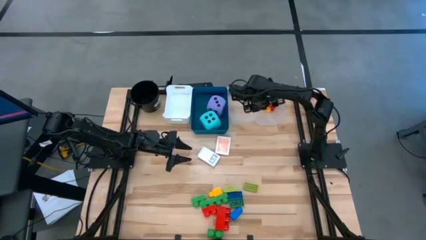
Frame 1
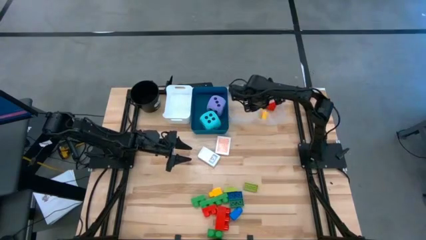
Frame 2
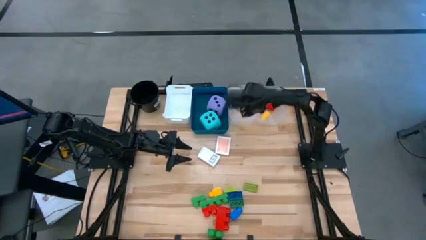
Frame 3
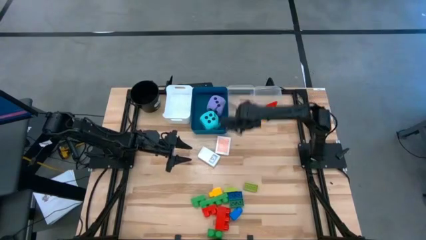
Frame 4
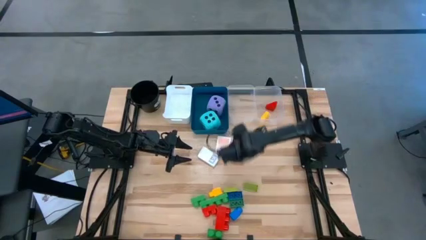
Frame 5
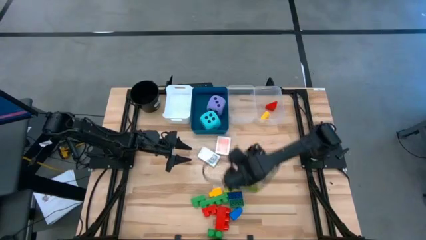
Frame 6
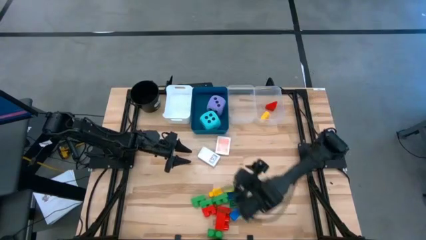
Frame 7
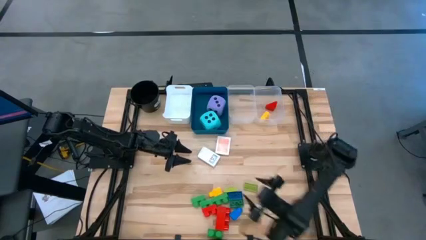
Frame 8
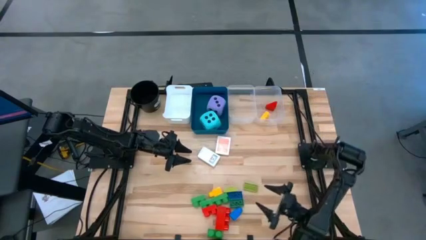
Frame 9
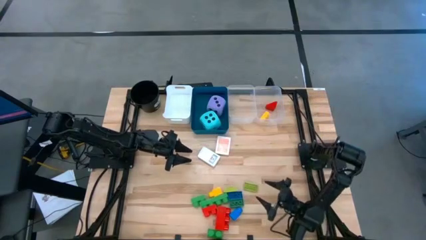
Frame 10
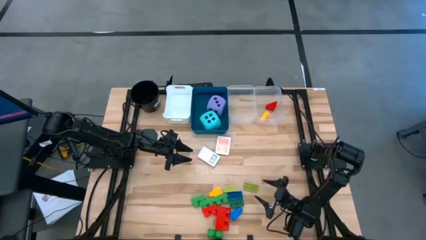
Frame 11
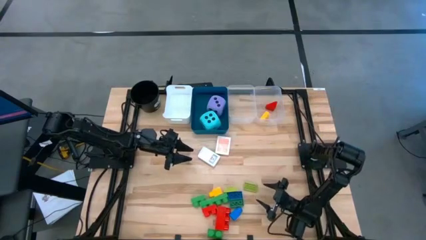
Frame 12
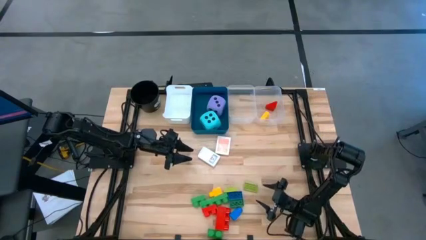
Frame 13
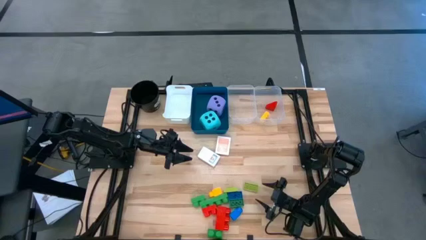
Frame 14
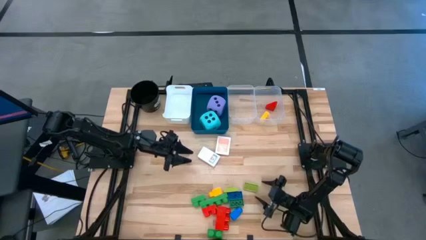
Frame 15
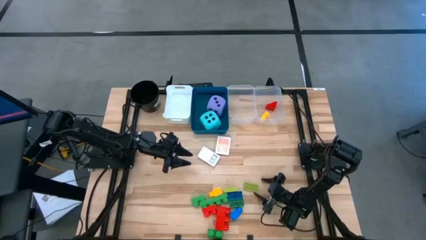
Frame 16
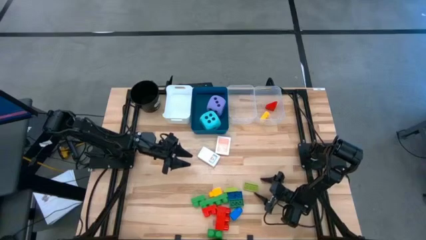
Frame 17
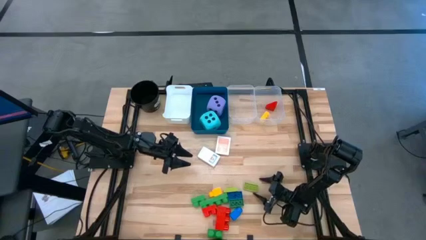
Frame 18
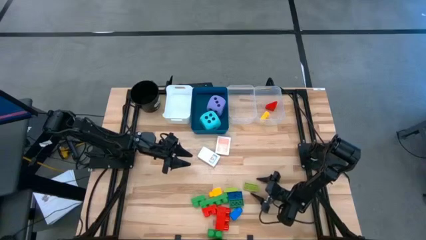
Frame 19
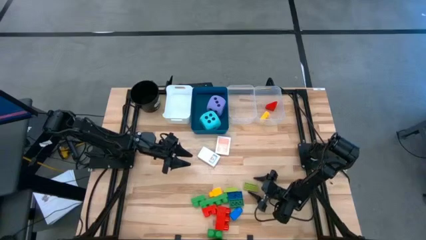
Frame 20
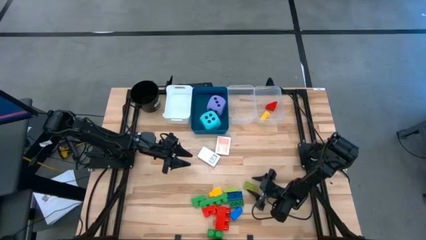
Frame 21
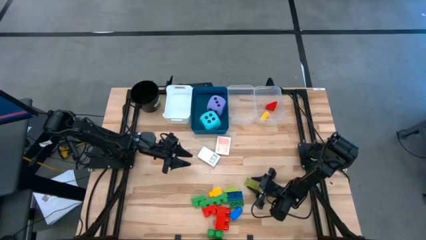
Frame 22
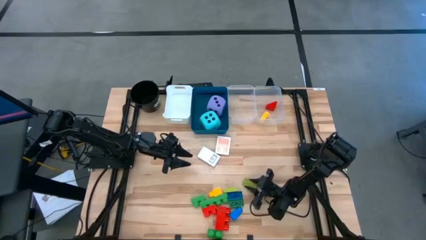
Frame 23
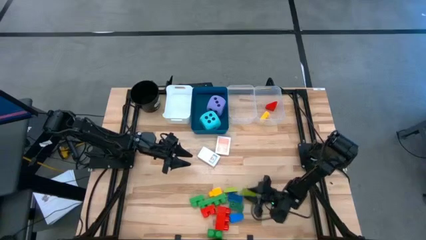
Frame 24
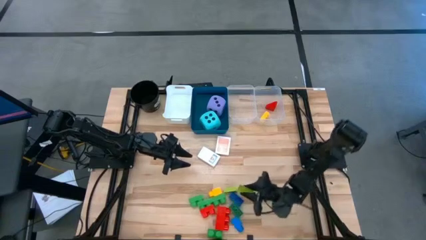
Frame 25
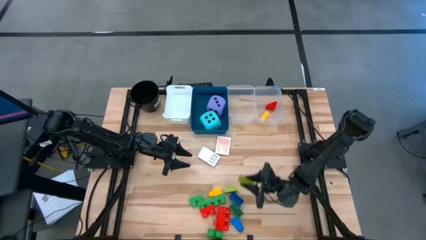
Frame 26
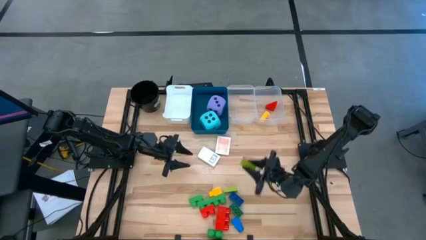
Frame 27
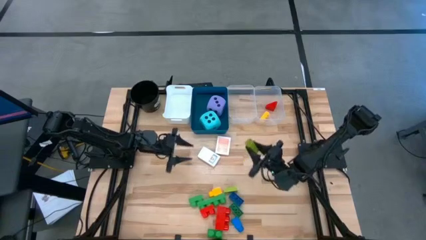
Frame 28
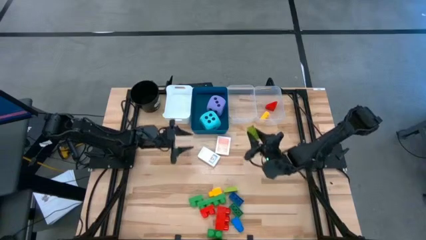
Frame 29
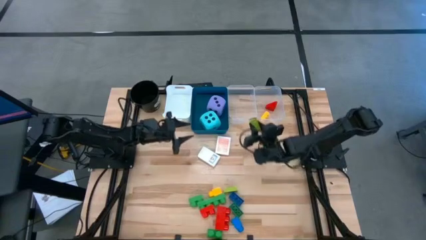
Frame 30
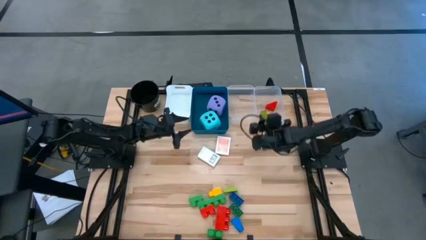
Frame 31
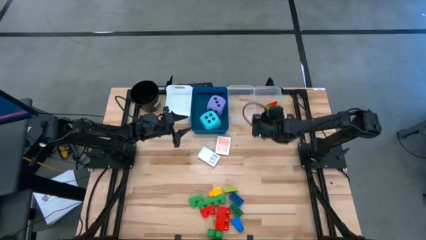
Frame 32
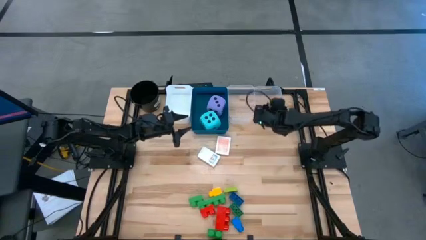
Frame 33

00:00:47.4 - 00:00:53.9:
Task: Pick & Place Toys
Put the small green game piece into the right transparent bin

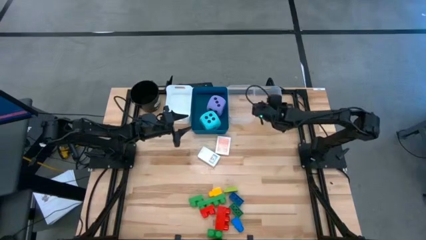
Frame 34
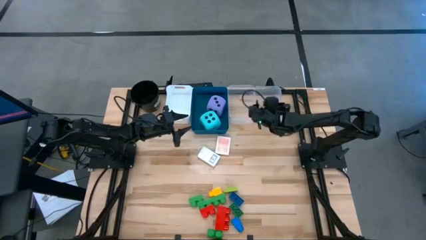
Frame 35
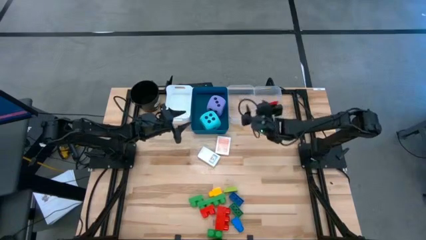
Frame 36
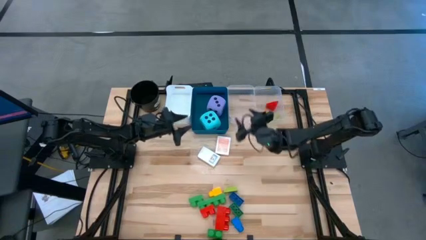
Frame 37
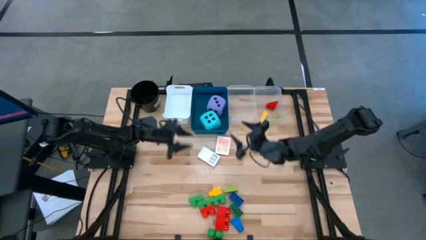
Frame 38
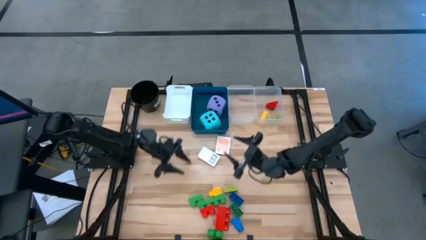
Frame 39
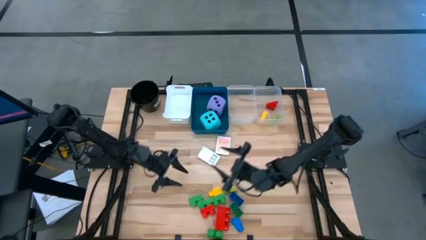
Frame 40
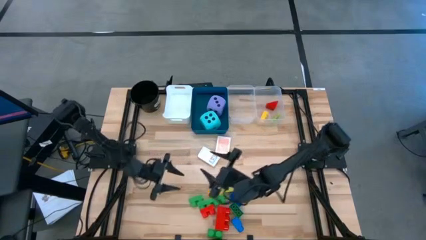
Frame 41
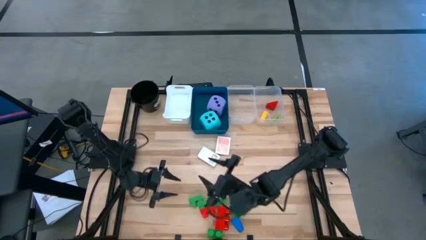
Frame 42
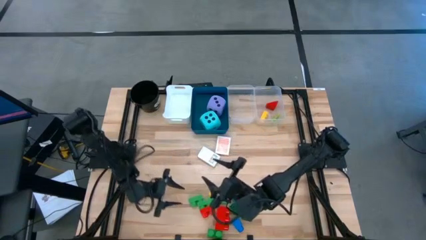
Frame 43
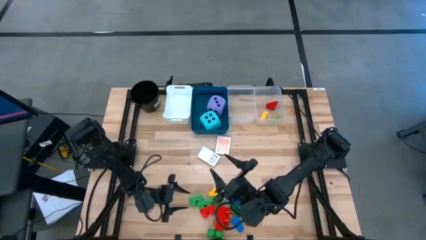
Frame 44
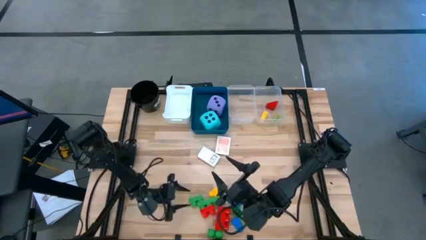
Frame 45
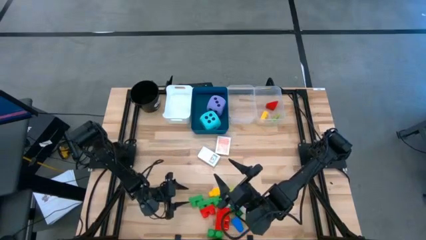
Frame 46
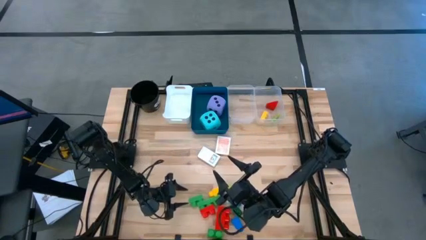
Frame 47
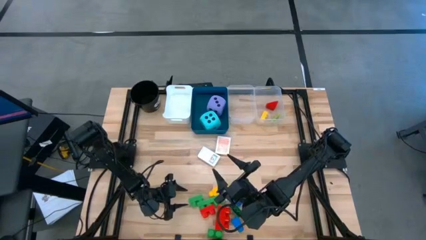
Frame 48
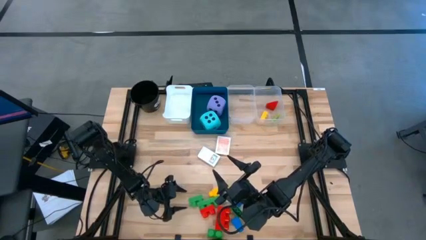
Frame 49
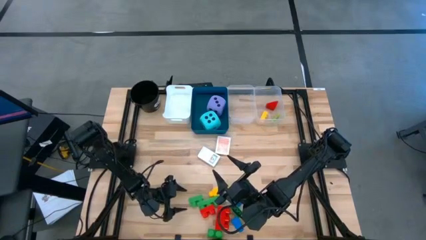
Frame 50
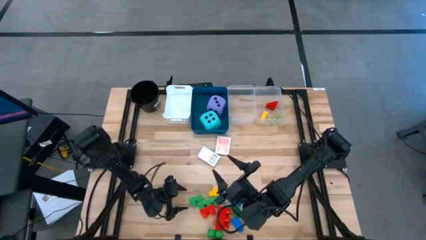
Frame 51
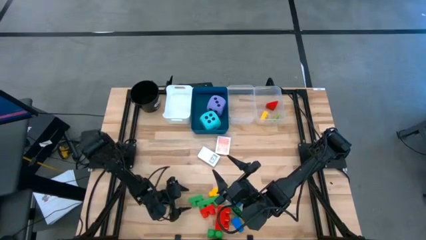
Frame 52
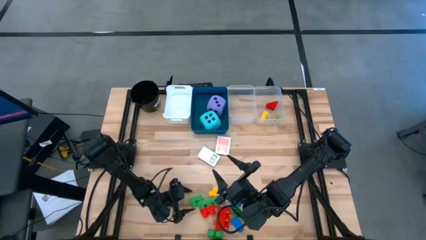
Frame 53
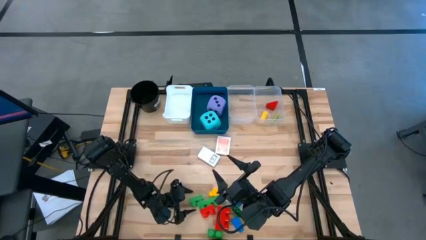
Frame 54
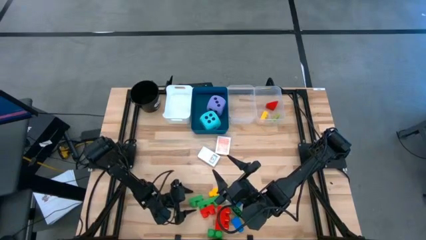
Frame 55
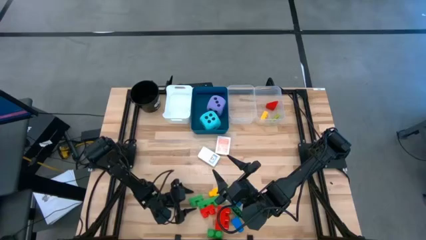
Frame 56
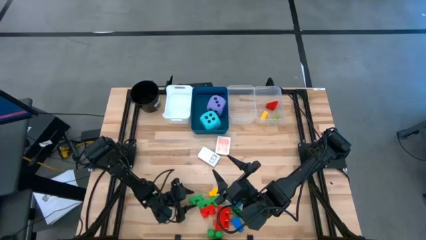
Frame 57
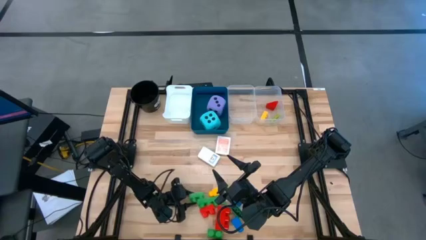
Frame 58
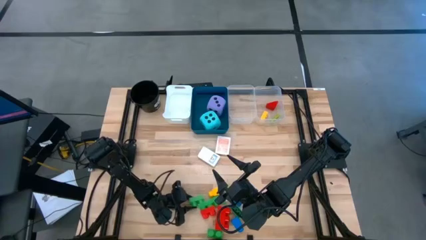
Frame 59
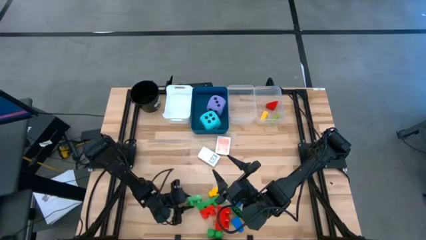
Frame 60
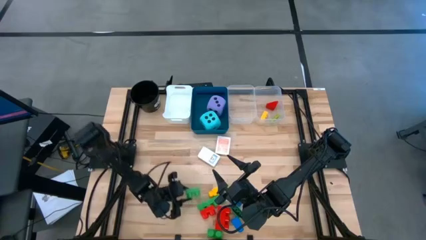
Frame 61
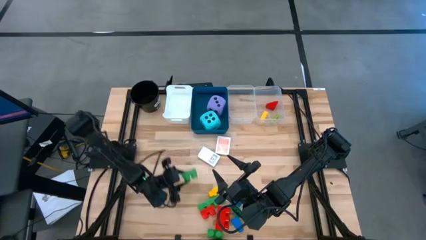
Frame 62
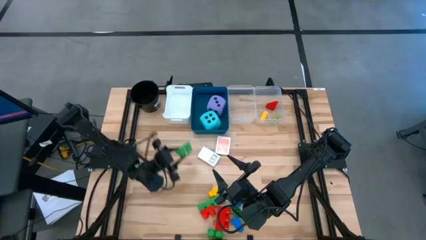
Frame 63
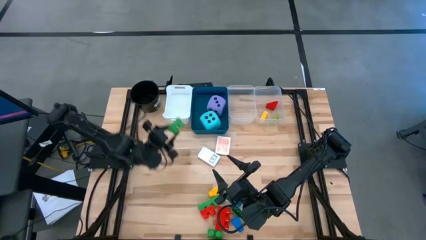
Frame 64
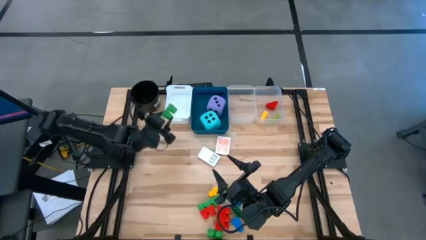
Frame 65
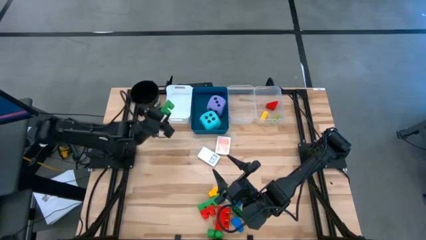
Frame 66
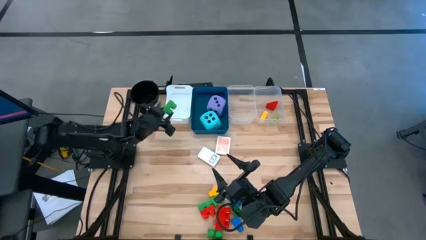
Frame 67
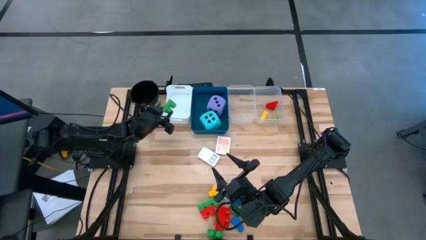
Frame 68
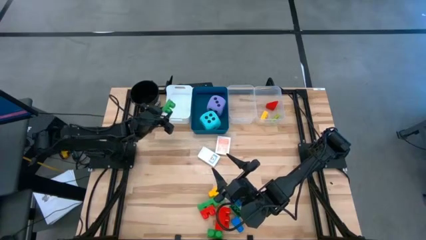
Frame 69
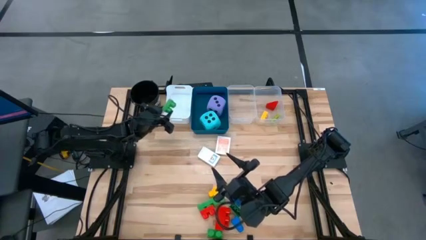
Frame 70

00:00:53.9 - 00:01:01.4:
Put the large green game piece into the white bin

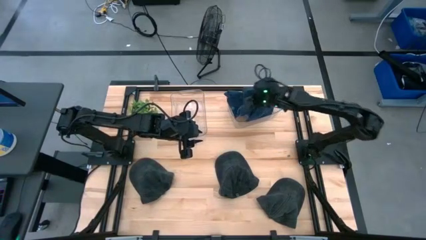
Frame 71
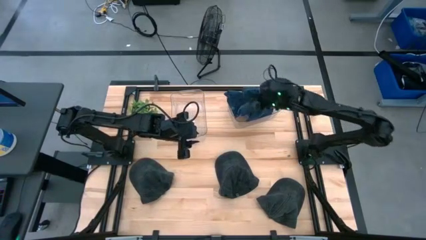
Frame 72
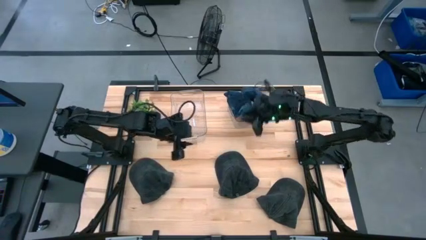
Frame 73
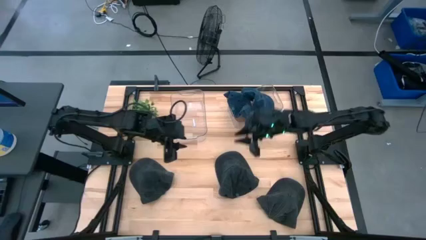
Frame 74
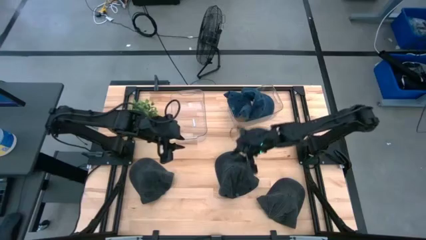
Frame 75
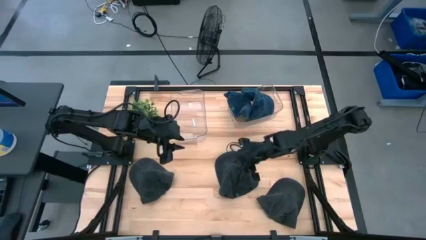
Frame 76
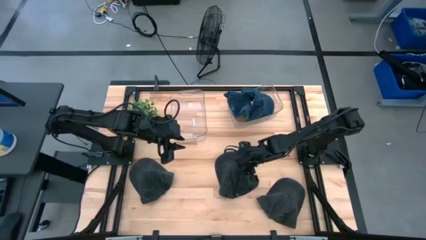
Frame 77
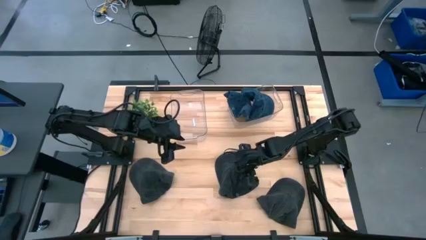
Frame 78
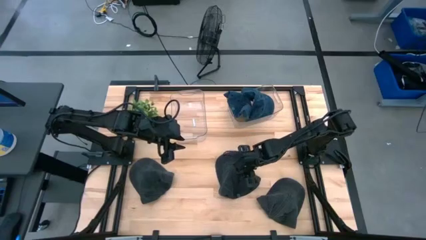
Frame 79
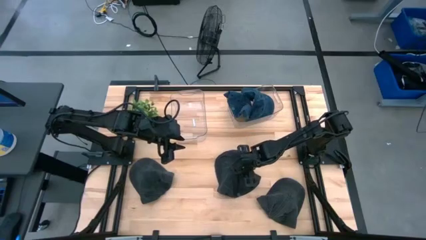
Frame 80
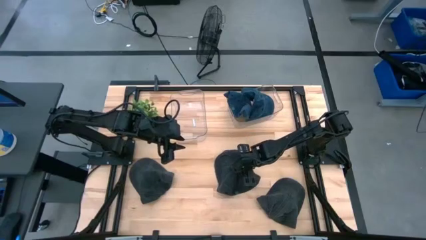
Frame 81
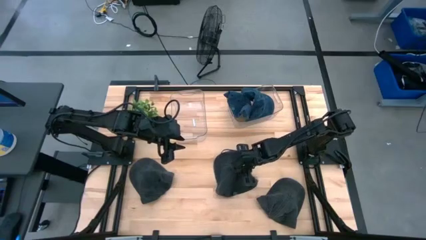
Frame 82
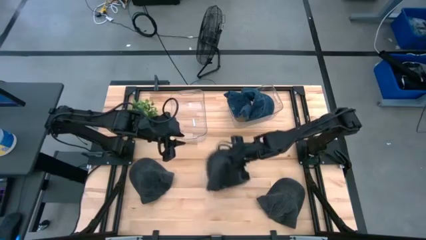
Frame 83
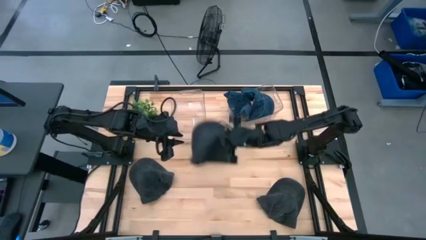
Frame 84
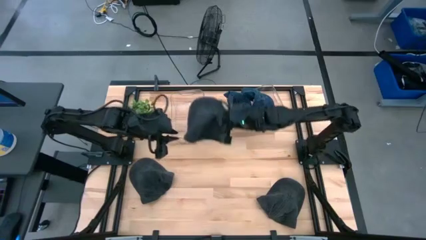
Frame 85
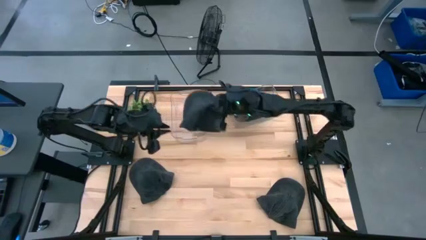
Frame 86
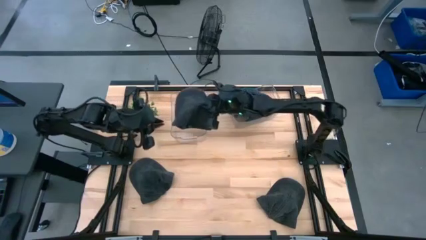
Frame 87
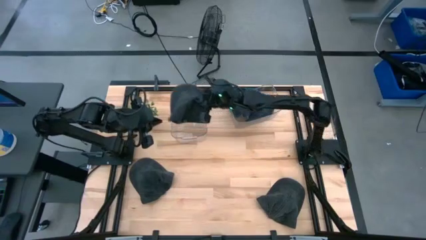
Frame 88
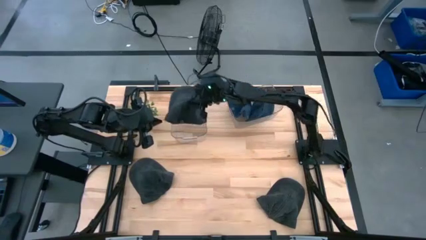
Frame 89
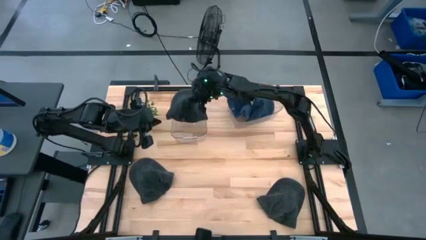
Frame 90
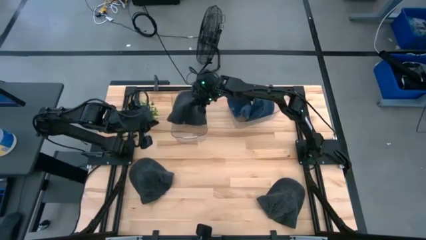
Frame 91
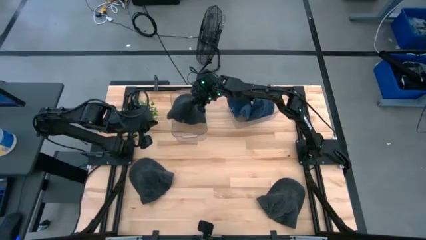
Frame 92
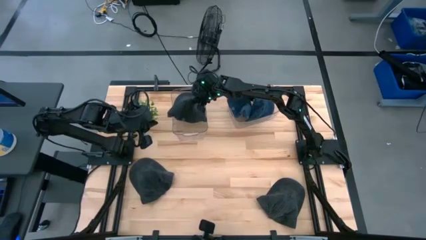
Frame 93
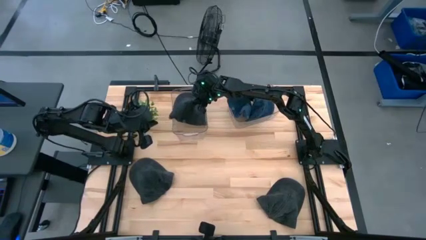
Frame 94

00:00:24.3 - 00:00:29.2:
Task: Pick & Place hat
Put the middle black cap into the left transparent bin
